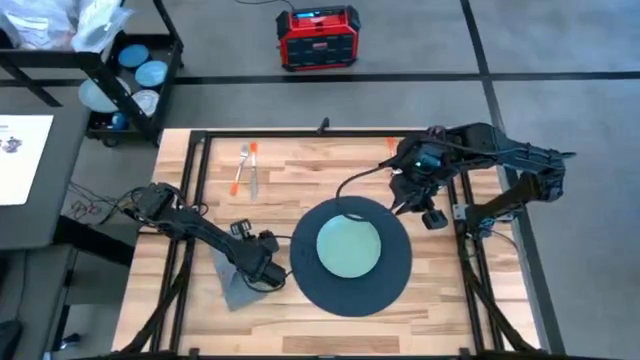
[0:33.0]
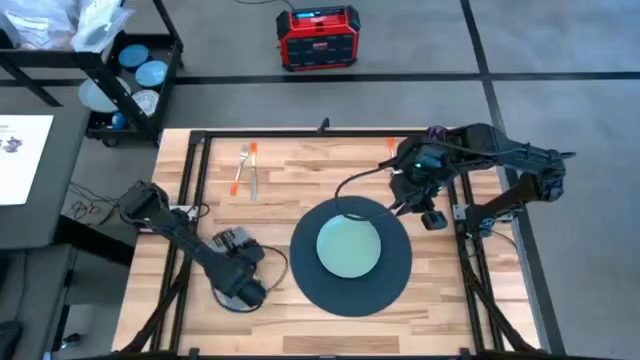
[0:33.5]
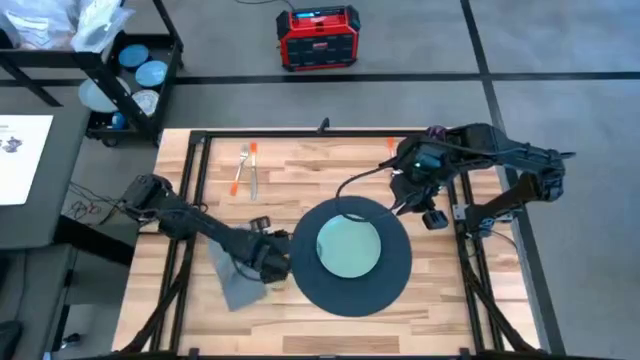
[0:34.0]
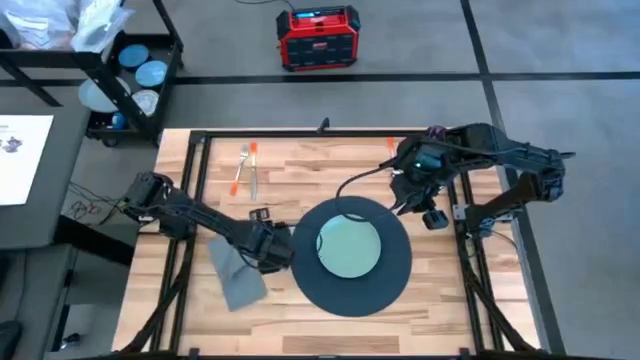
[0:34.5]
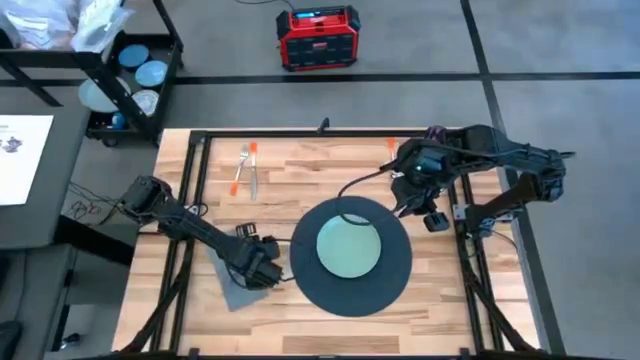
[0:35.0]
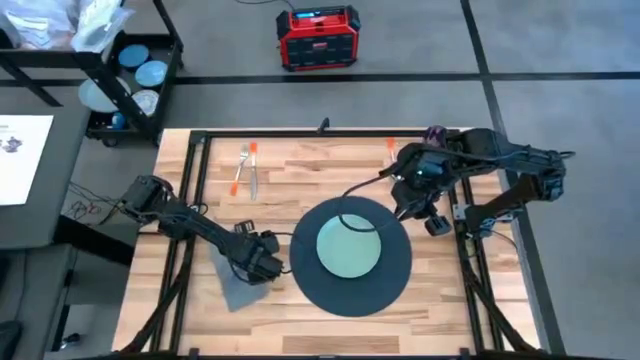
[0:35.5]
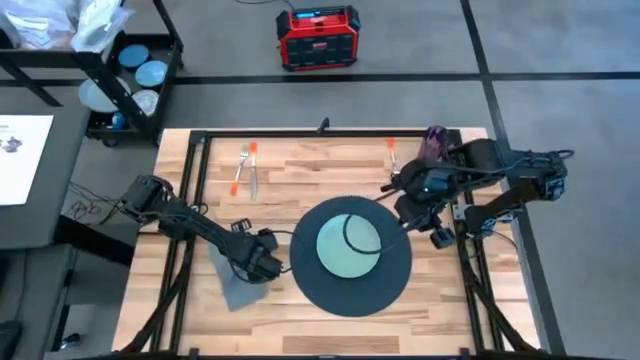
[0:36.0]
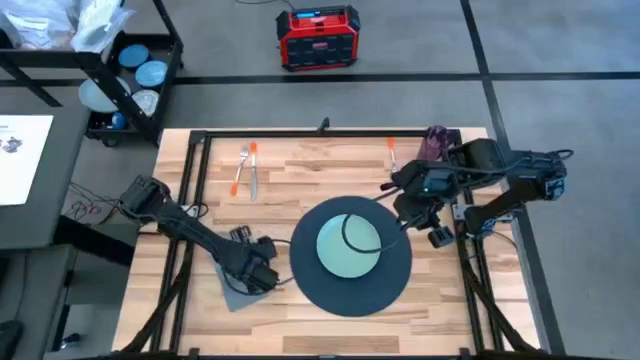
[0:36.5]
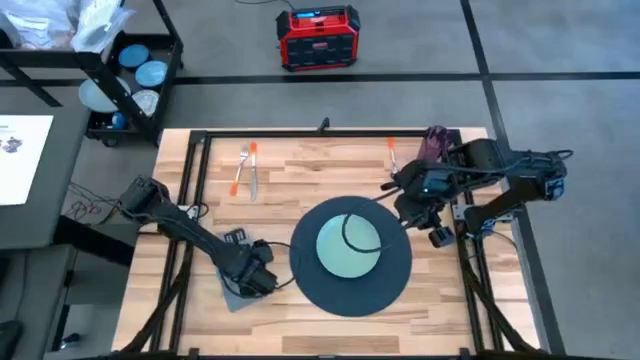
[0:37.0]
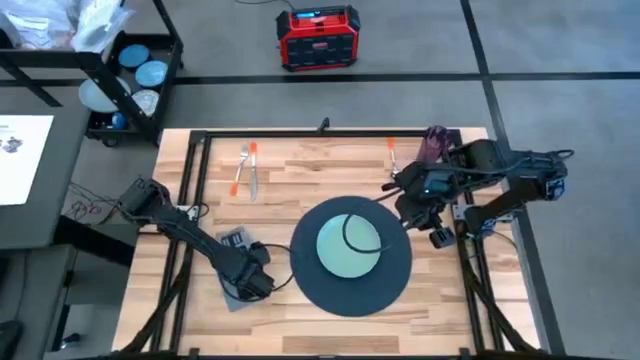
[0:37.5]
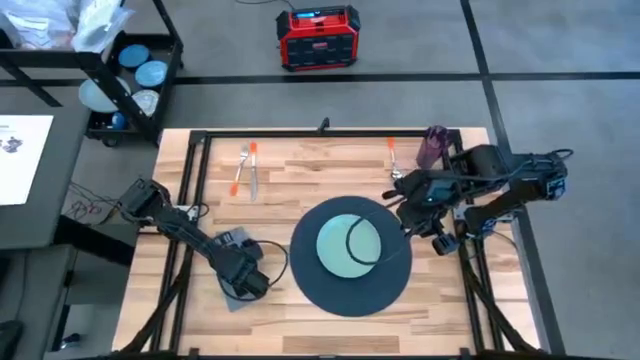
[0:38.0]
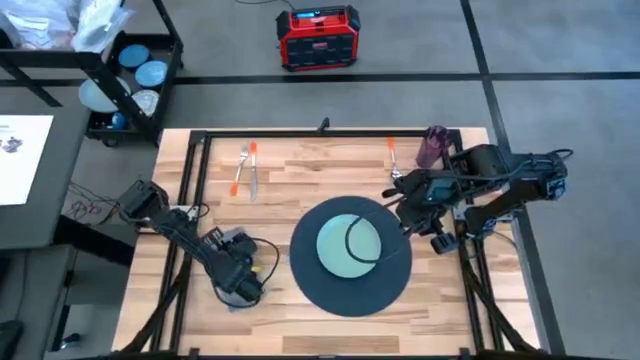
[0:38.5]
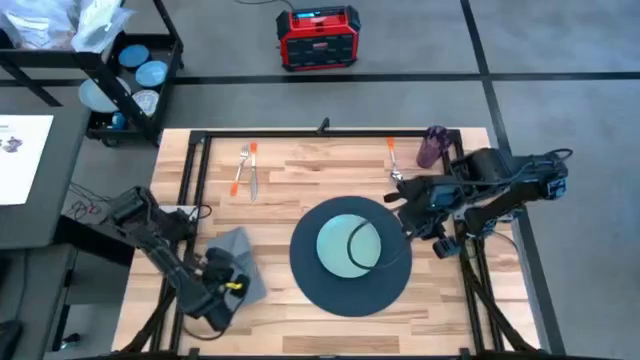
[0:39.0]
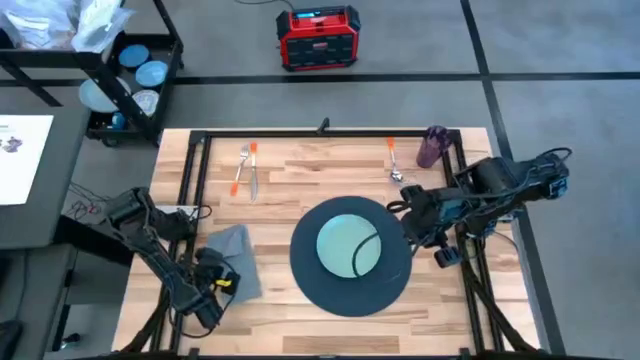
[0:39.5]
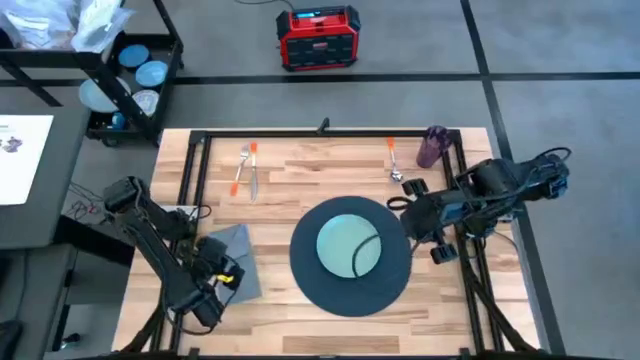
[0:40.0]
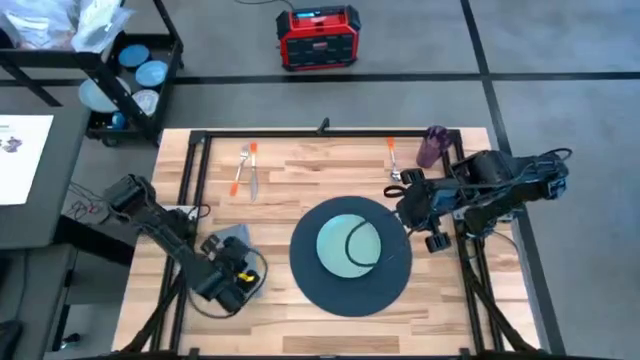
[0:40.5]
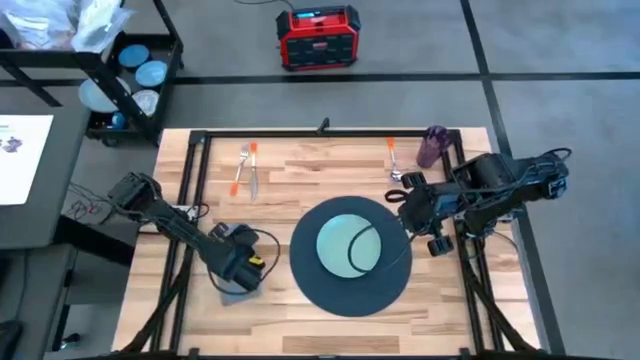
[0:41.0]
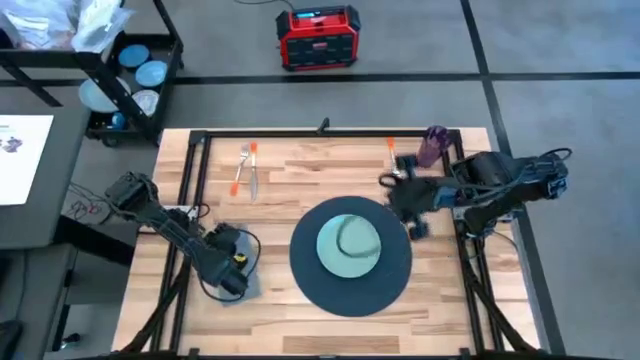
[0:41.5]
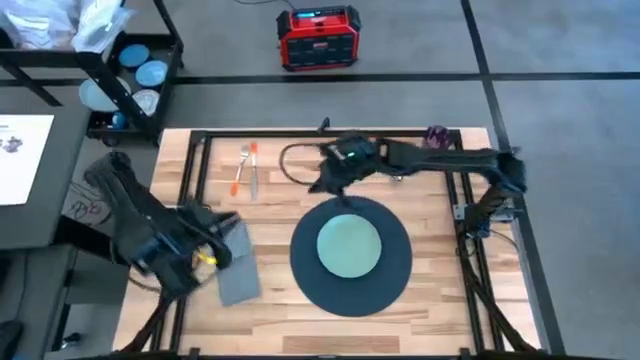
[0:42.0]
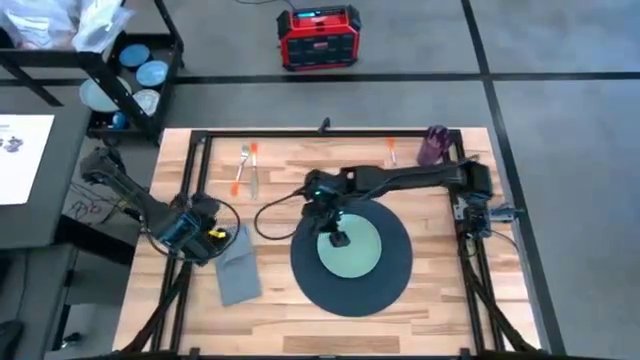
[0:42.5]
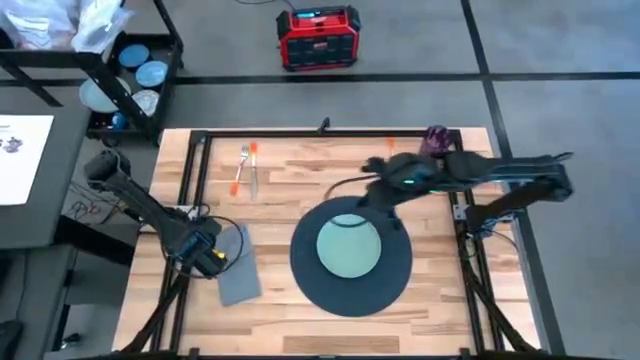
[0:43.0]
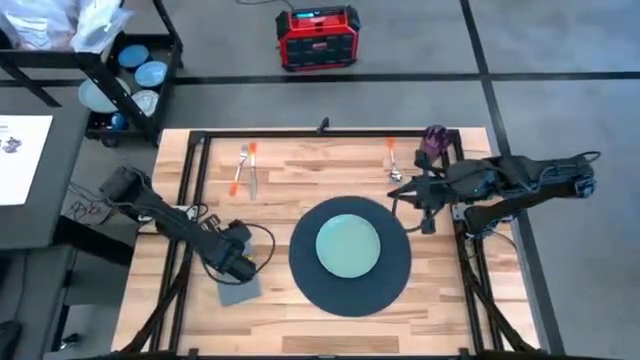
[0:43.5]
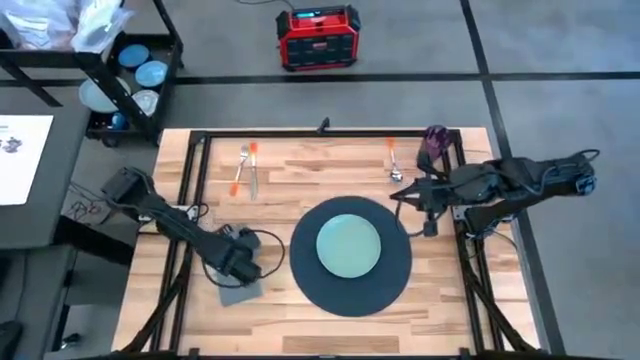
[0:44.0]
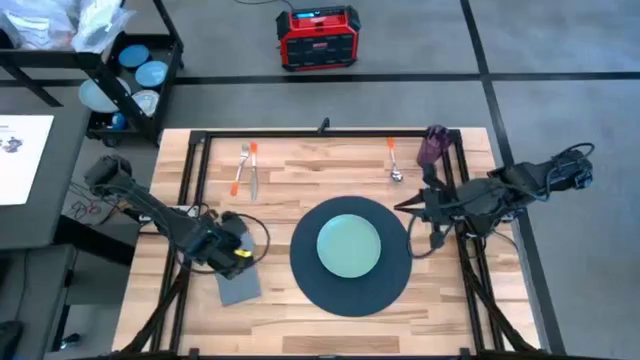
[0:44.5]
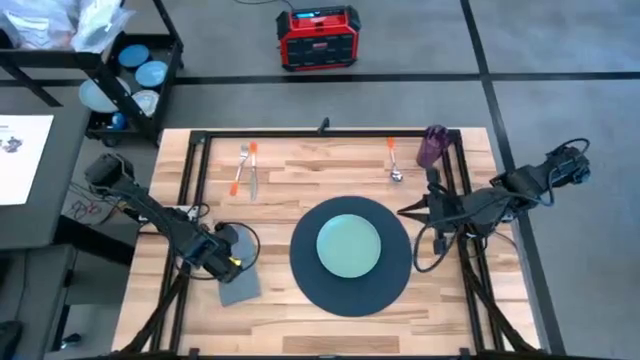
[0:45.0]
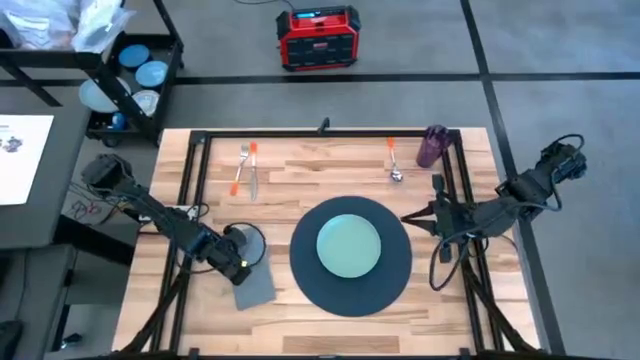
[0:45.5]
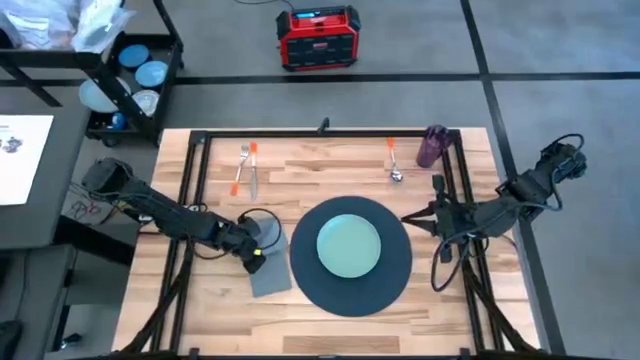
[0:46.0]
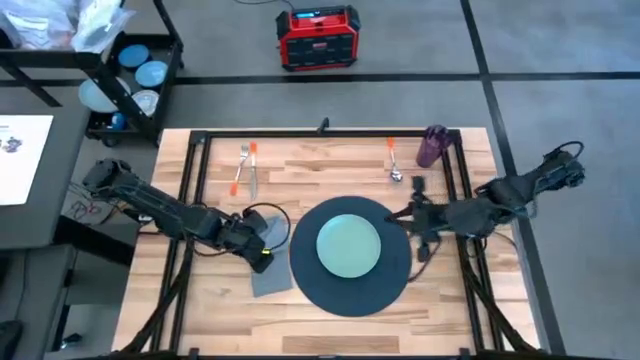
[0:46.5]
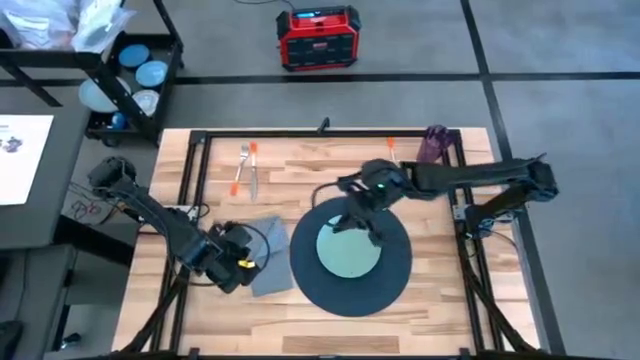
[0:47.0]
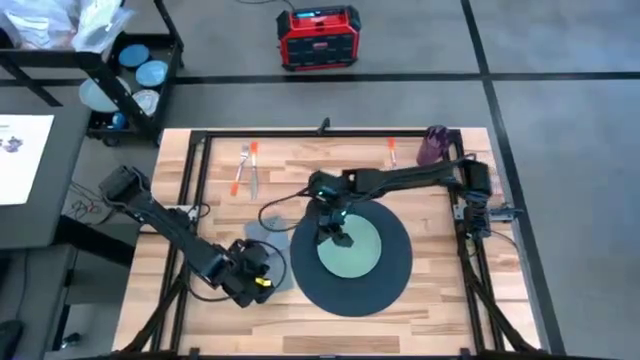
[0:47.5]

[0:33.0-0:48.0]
Task: Set table place
Fold the grey napkin

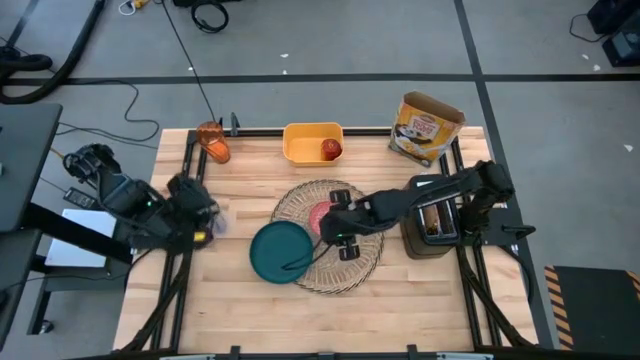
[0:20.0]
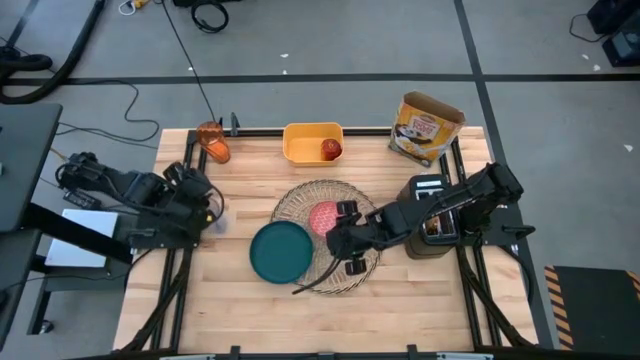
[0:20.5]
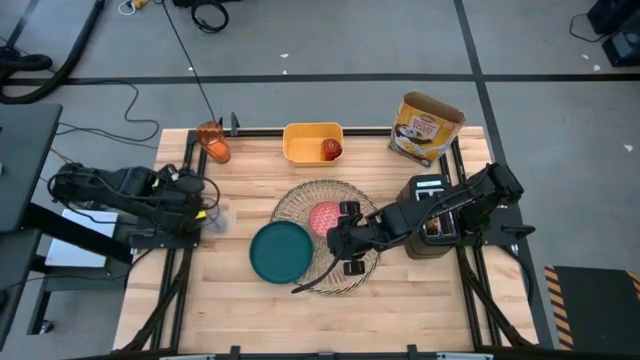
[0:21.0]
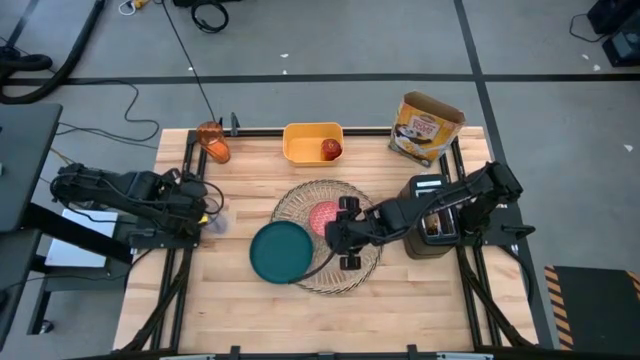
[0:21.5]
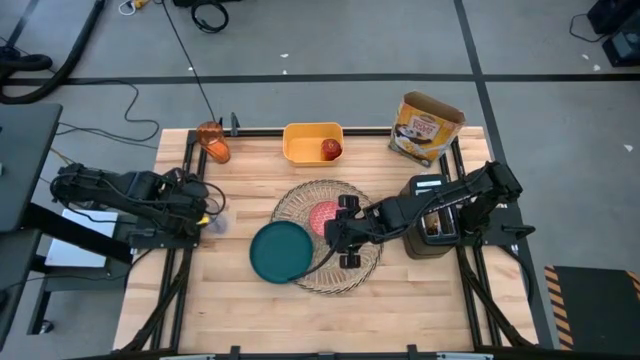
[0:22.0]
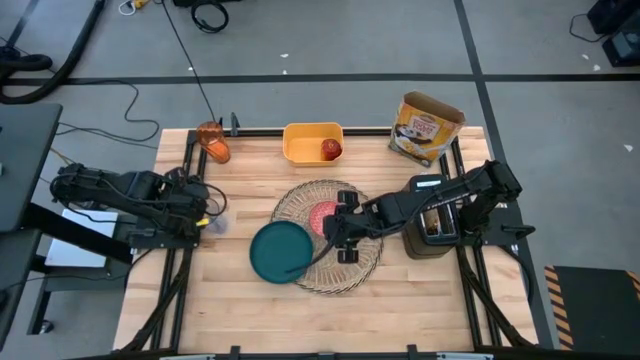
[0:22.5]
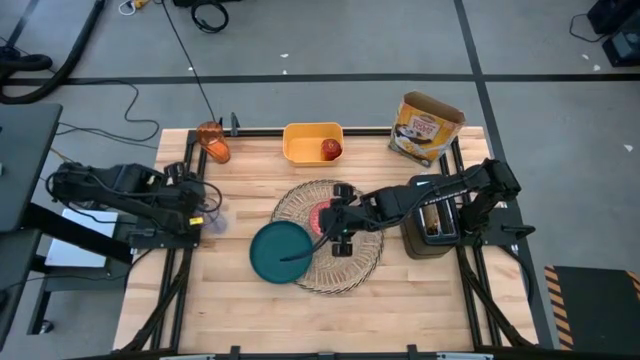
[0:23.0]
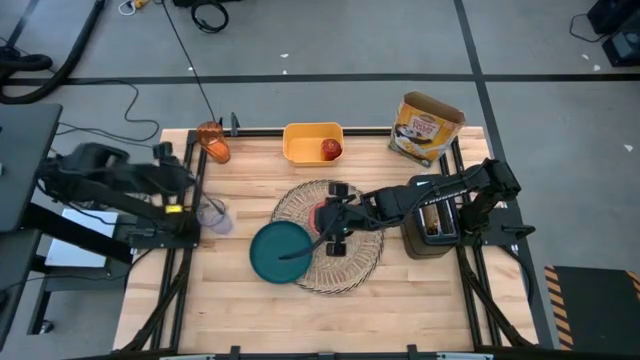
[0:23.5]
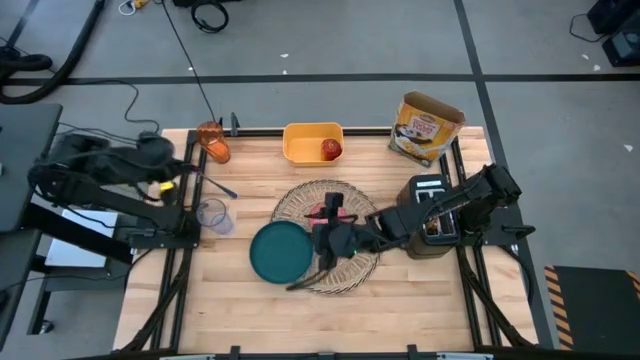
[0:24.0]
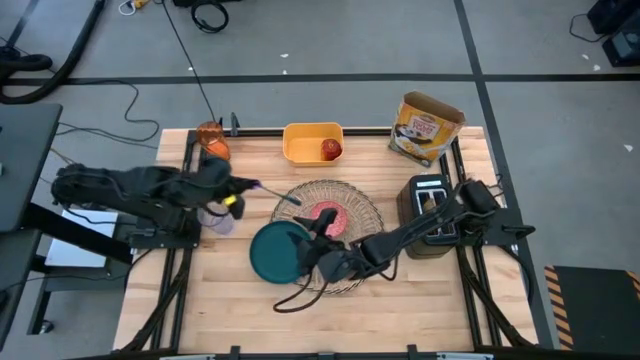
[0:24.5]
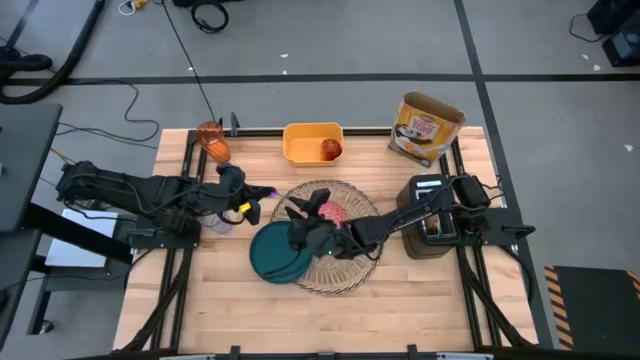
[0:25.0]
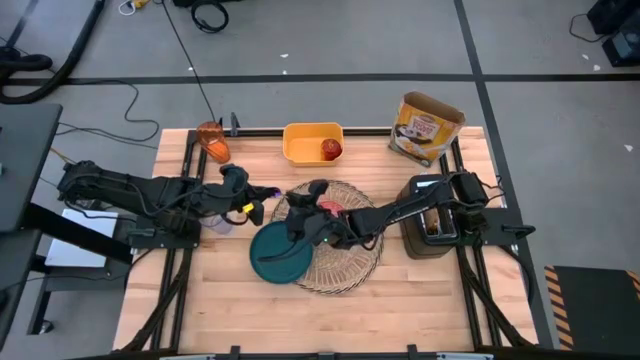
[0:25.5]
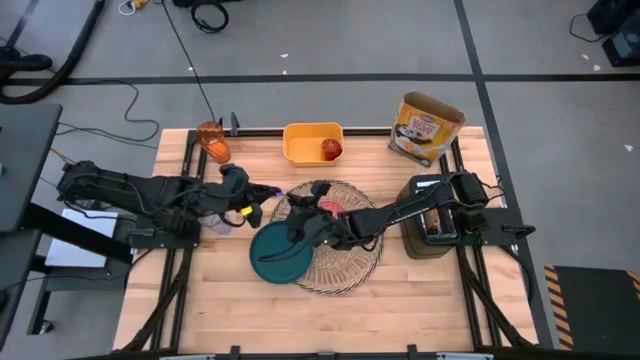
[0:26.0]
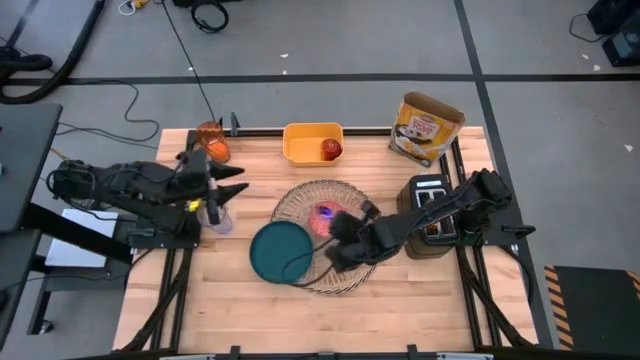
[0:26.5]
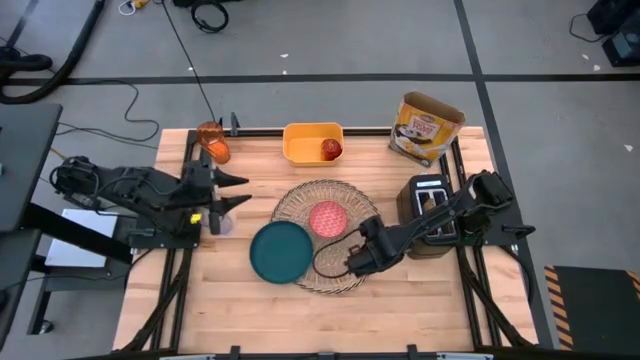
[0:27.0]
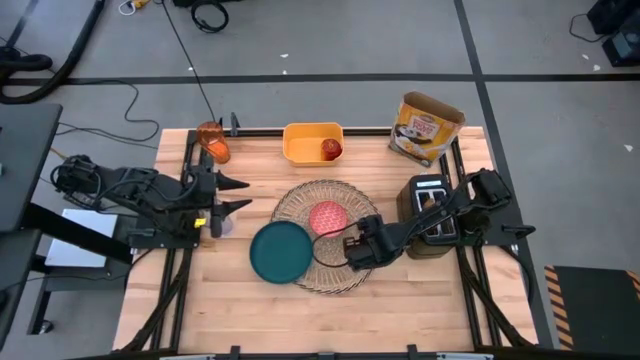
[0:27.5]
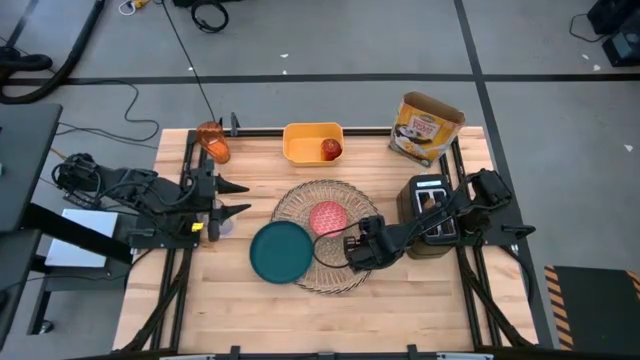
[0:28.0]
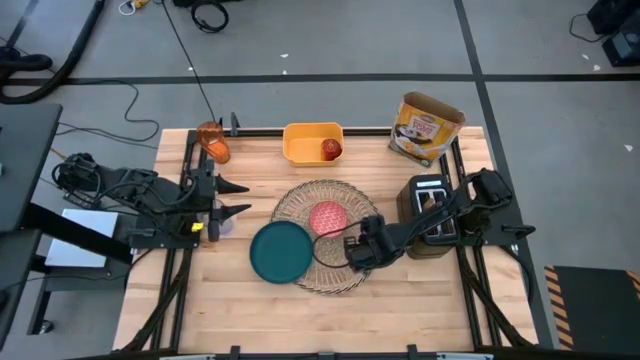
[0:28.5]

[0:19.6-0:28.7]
Task: Arrange a breakfast setting
Put the blue spoon on the right side of the brown table mat
